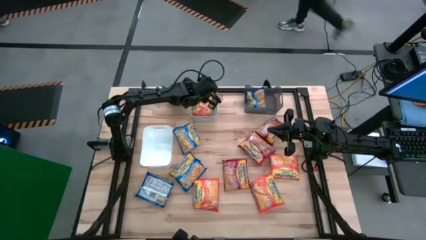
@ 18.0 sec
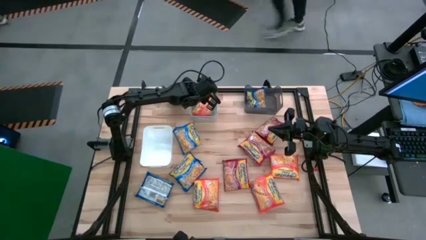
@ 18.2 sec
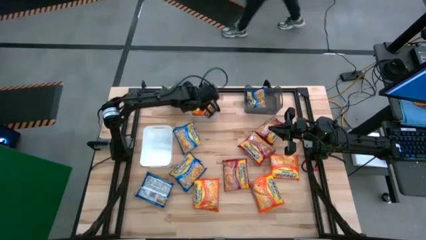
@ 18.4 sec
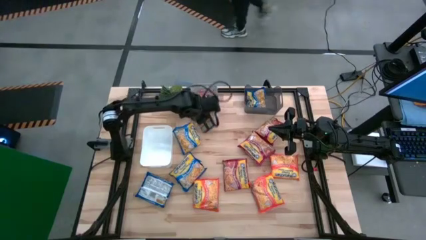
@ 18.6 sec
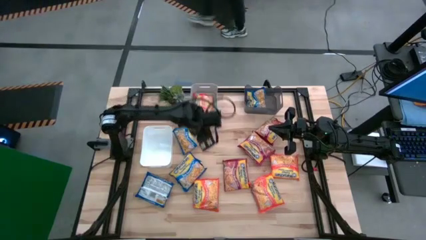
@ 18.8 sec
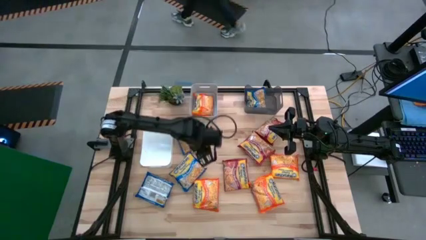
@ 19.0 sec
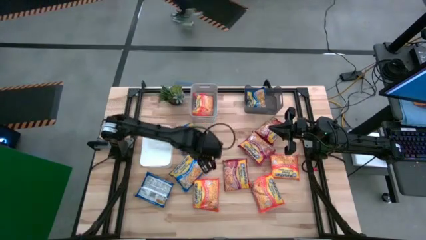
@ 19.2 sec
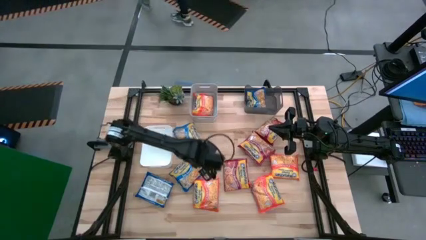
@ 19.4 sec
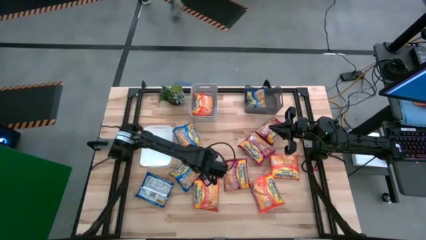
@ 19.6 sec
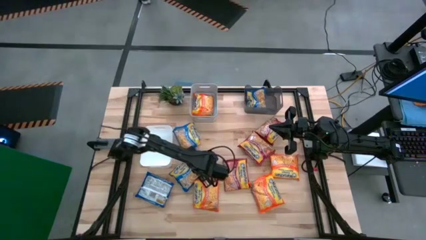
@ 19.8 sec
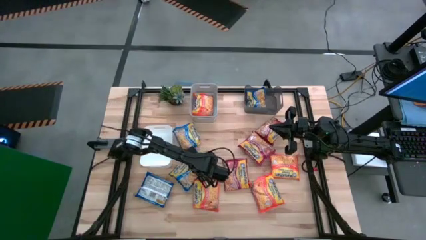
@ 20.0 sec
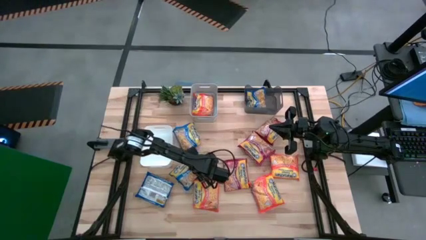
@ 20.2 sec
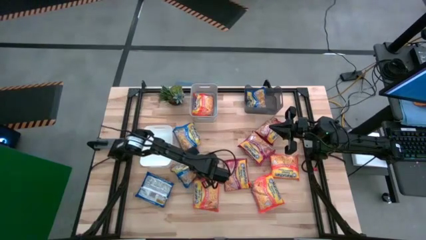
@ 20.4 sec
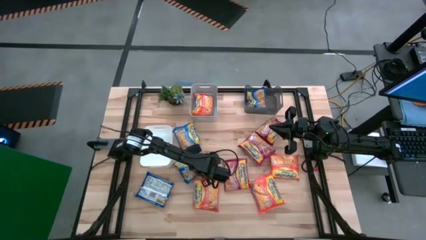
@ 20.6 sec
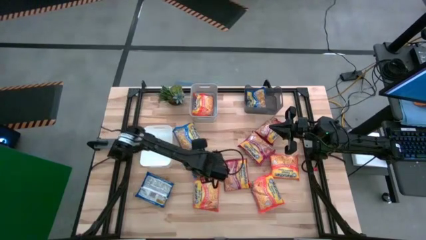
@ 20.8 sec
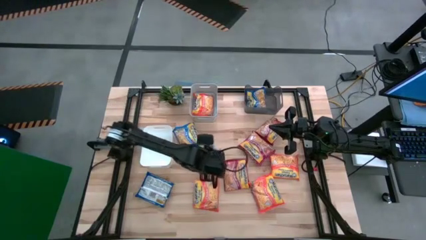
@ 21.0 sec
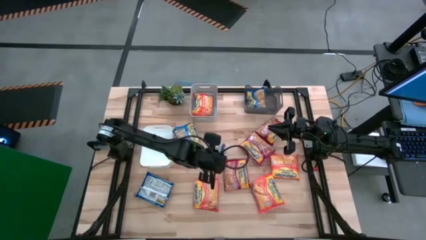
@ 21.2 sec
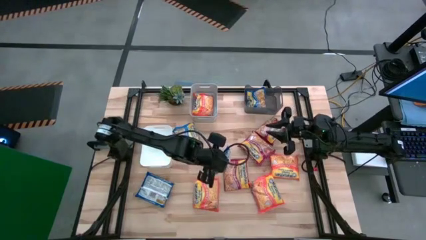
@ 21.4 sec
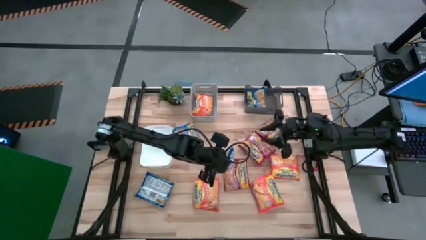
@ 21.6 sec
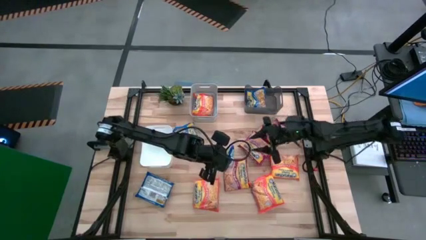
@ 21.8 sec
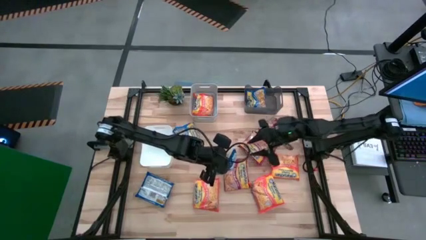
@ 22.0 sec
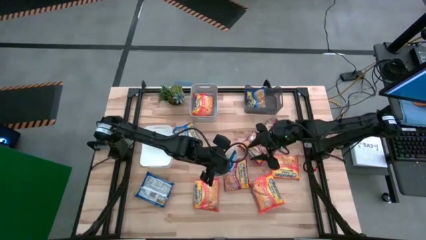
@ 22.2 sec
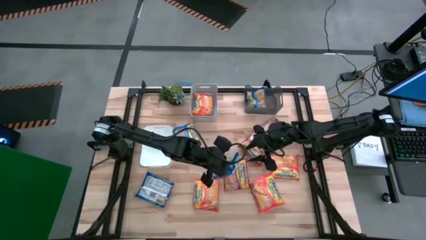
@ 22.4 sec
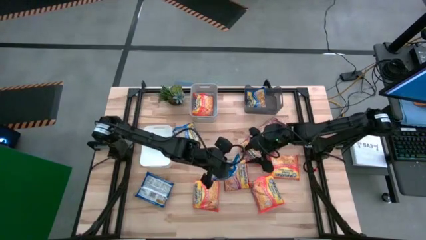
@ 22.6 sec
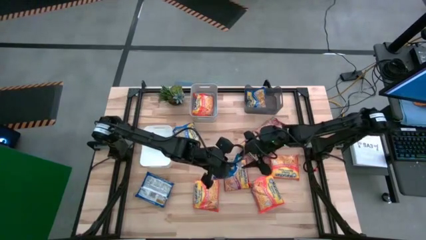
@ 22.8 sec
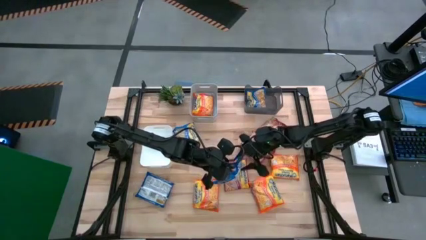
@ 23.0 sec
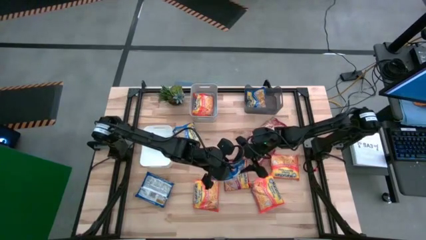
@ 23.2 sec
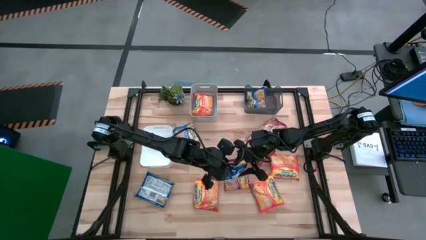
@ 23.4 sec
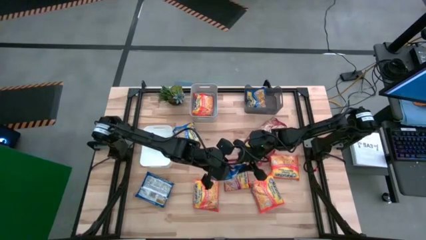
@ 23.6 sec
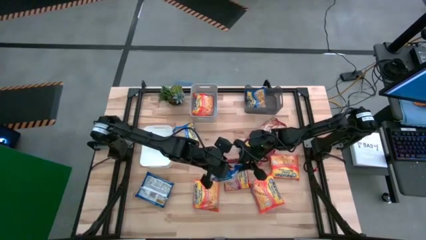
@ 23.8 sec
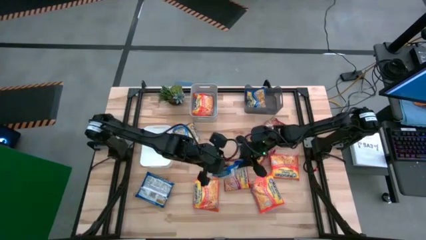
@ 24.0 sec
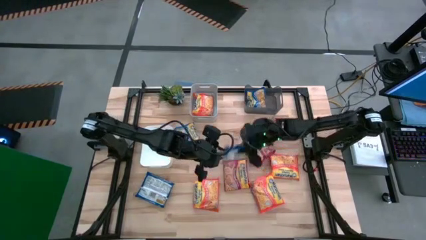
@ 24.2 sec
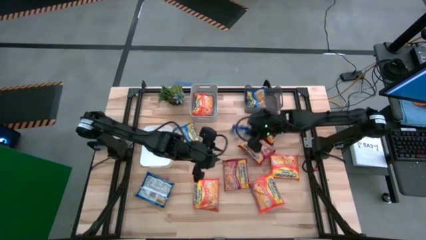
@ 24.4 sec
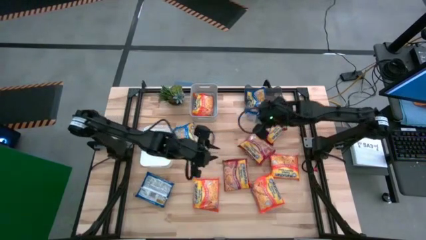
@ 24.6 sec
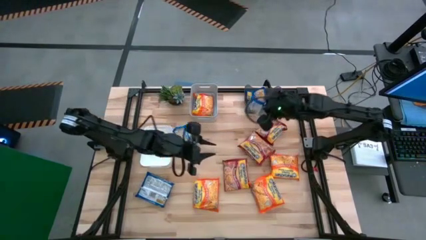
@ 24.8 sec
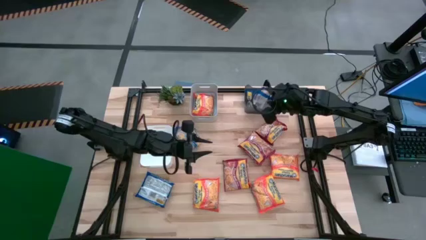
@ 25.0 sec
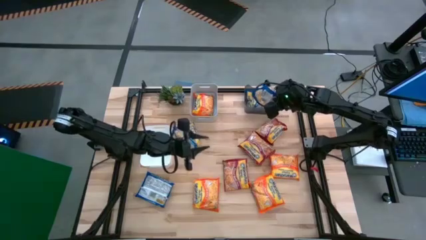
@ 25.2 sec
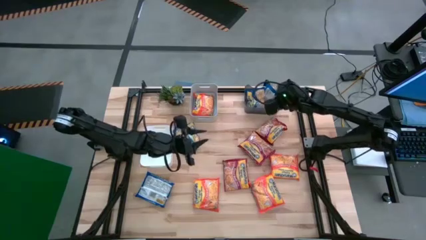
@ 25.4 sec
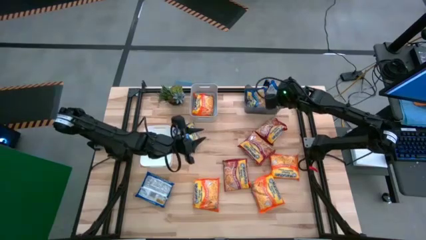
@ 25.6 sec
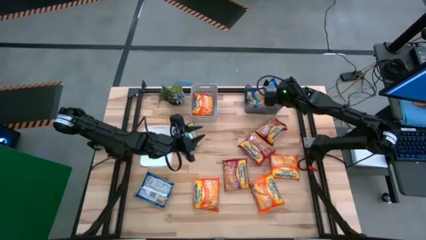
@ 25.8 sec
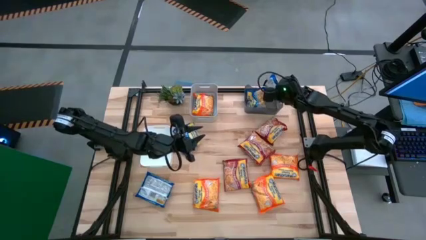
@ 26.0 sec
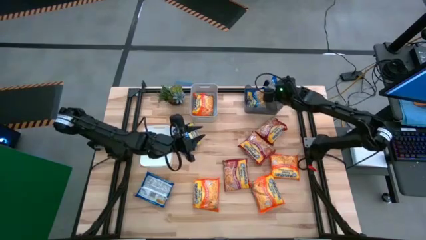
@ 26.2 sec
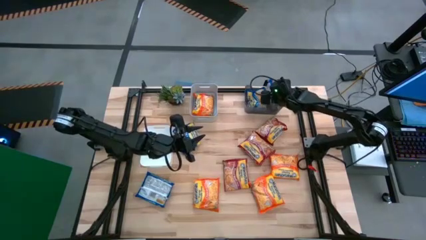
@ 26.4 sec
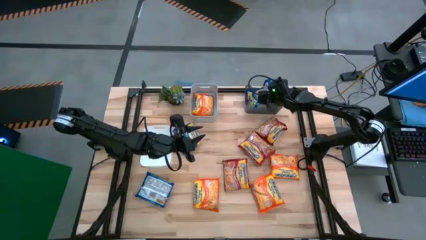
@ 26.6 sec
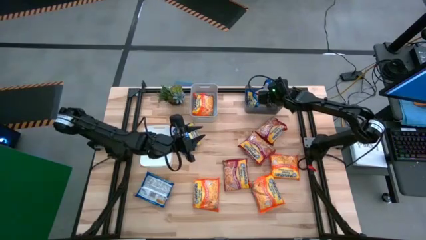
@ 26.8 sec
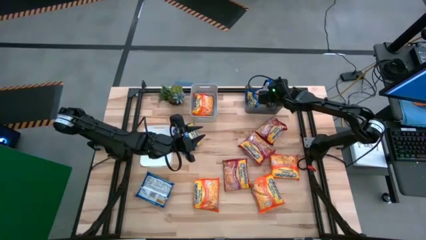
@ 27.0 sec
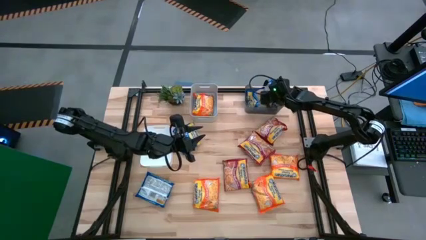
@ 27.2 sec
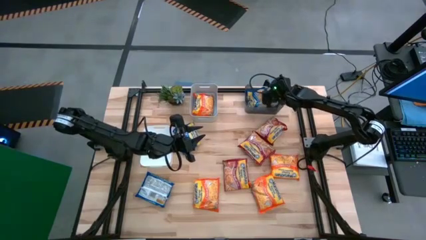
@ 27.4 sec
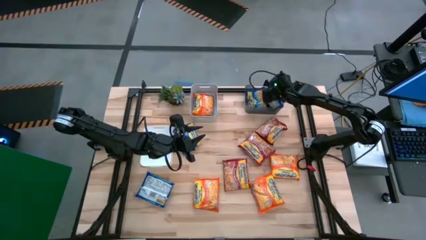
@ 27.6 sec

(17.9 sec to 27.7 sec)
Task: Sort Maruchan noodles
Put the blue noodle pack into the black bin

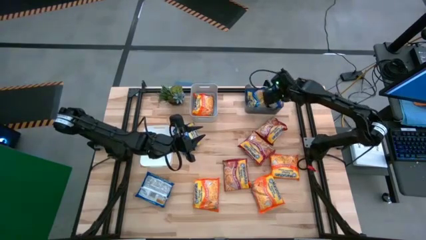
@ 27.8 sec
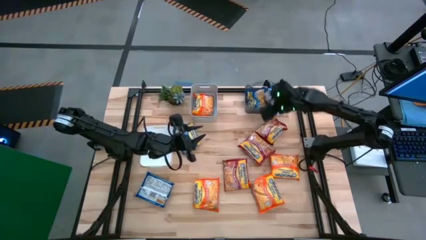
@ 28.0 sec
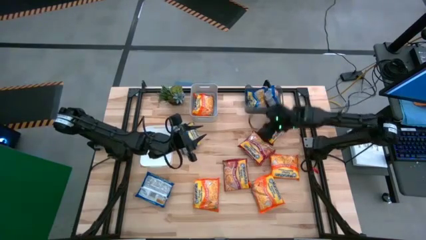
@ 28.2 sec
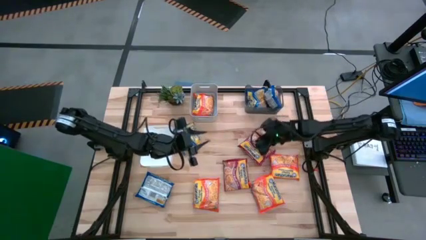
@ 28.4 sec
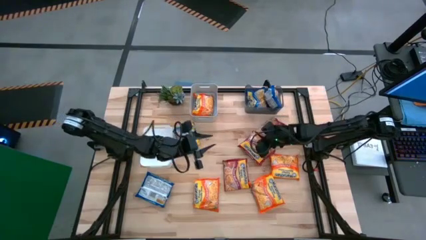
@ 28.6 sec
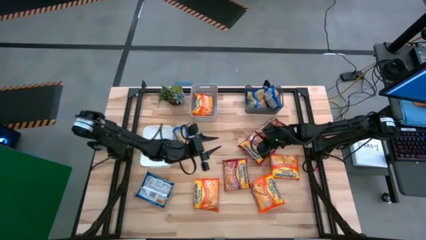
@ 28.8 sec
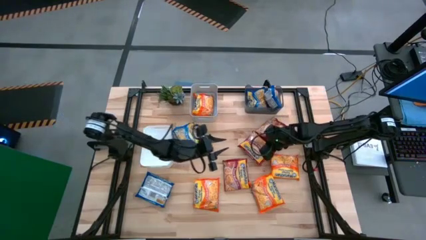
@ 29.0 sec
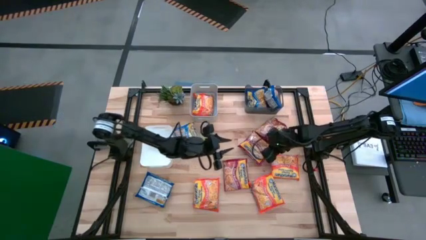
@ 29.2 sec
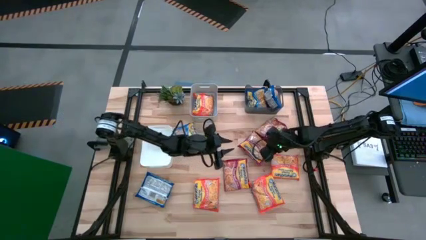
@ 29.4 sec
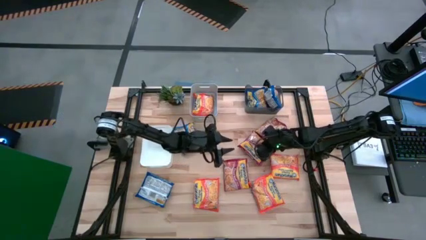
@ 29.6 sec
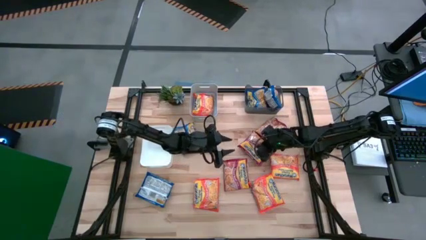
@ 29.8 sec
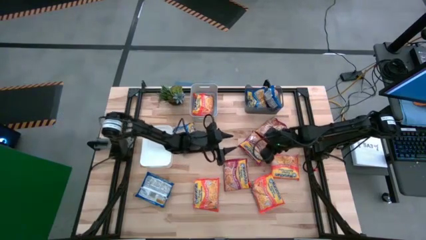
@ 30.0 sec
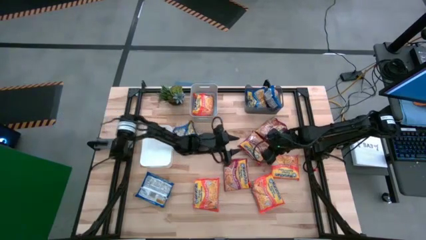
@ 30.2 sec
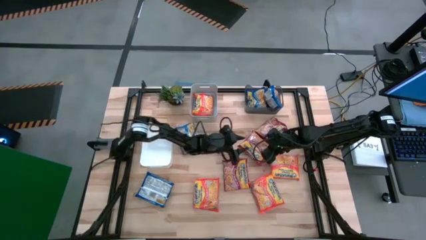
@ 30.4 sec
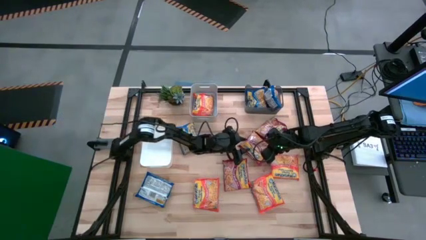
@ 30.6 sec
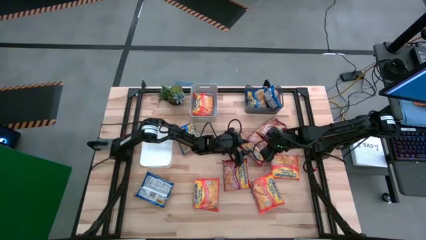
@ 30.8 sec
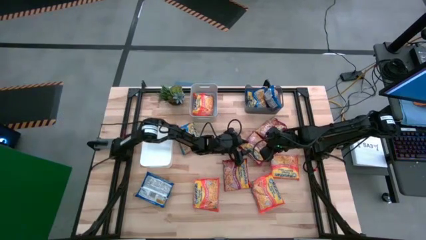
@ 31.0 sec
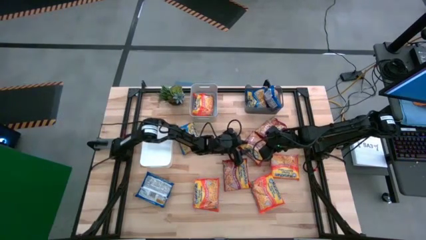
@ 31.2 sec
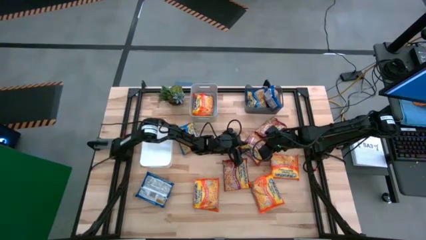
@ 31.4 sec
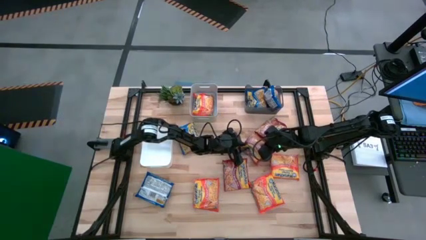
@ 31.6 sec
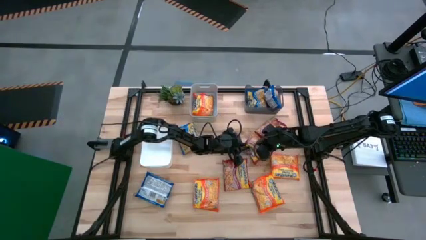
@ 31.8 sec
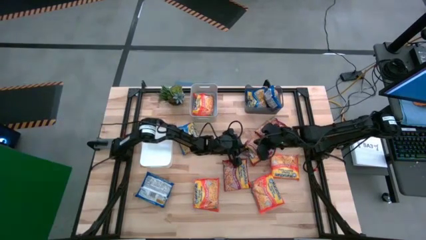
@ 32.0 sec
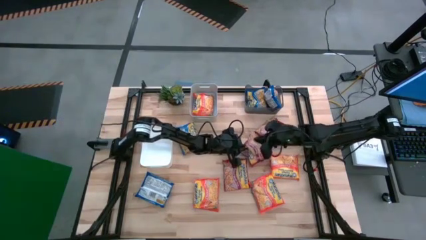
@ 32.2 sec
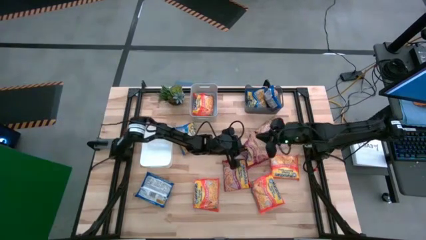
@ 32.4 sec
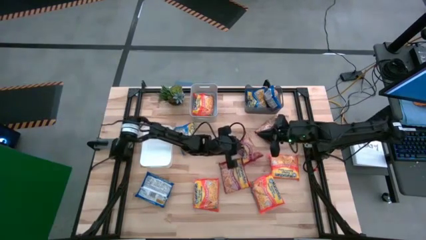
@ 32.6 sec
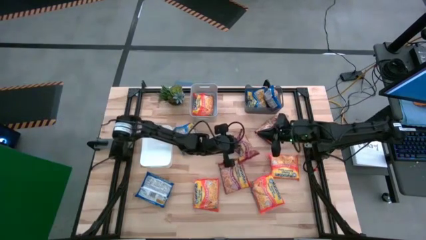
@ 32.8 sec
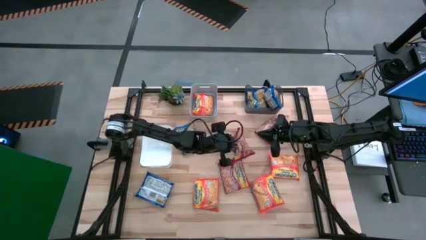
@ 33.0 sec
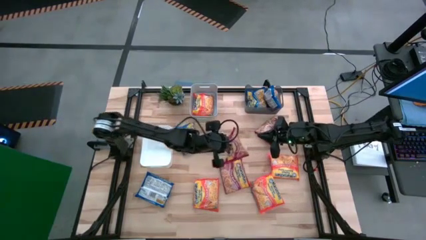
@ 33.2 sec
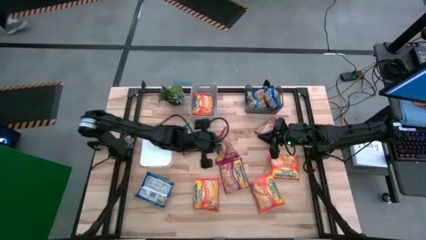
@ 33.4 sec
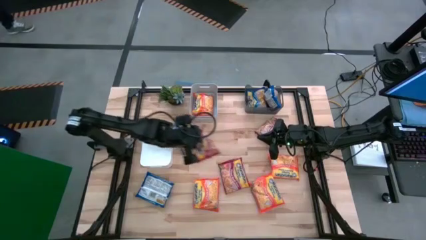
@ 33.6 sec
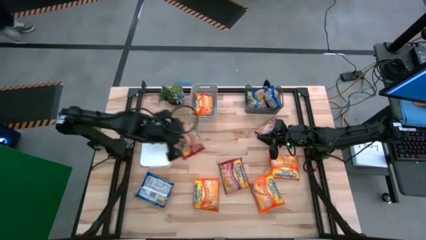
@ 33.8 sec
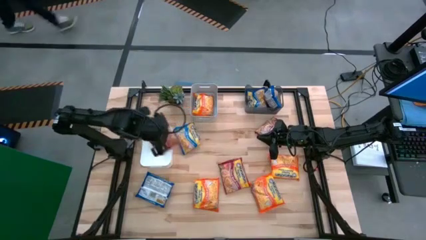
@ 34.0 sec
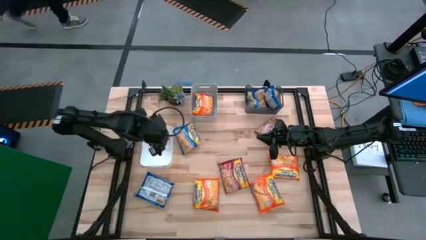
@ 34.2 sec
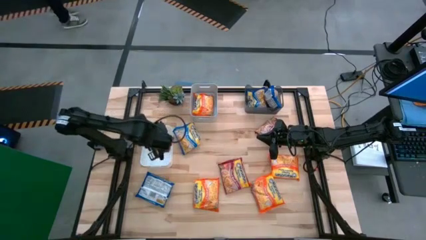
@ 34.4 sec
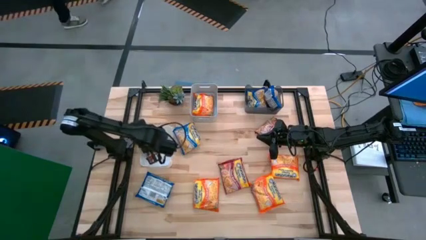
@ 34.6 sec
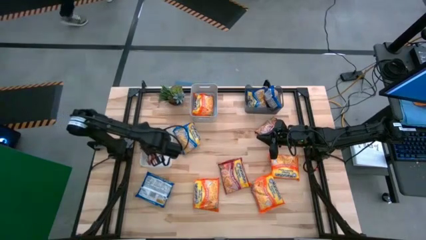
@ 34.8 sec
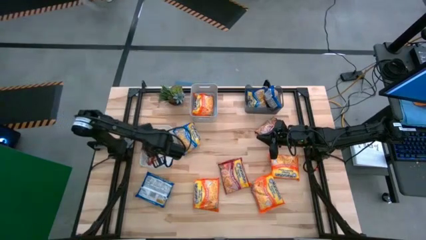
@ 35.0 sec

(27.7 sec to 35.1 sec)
Put the red noodle pack into the white bin
